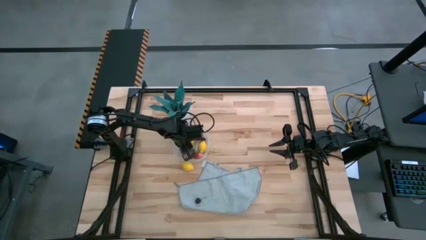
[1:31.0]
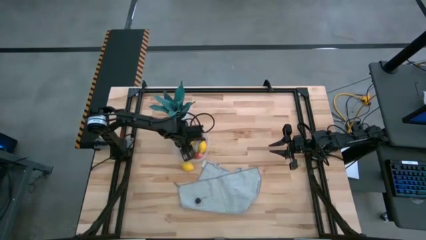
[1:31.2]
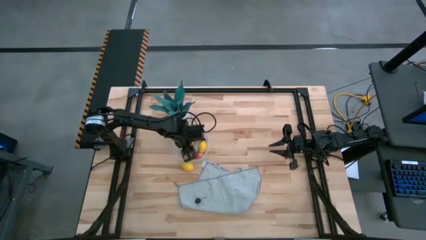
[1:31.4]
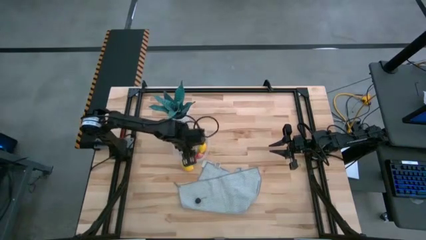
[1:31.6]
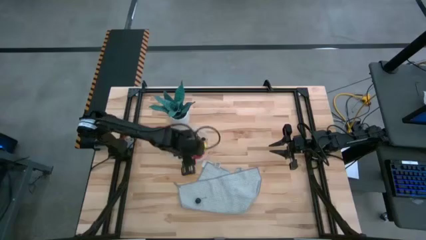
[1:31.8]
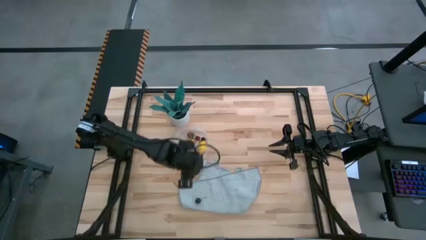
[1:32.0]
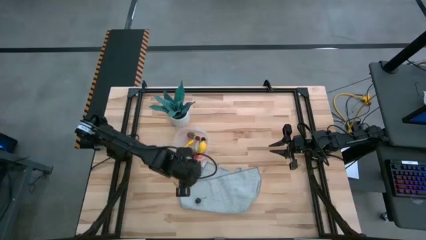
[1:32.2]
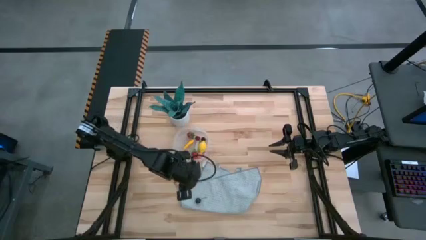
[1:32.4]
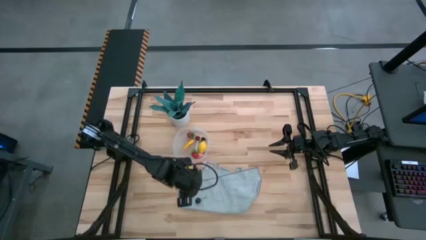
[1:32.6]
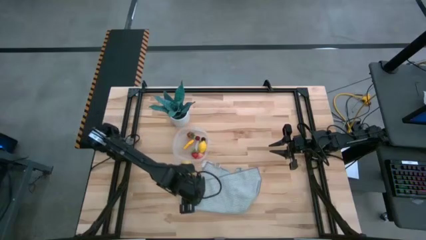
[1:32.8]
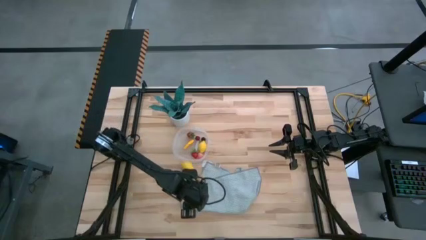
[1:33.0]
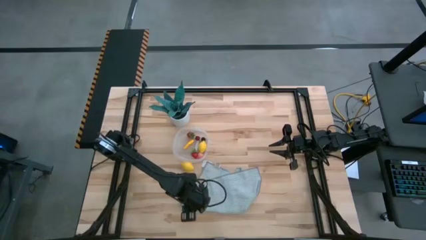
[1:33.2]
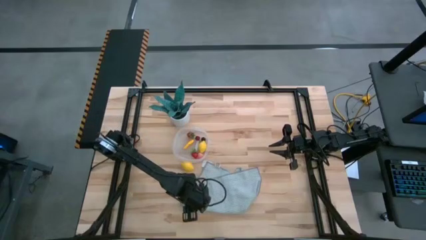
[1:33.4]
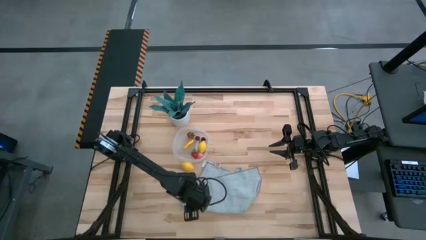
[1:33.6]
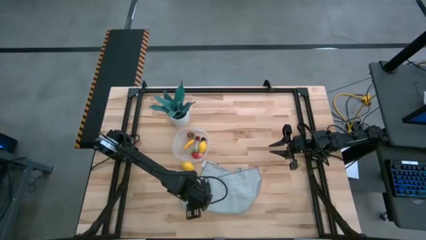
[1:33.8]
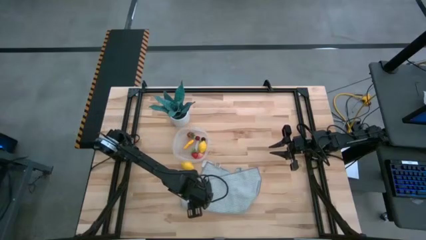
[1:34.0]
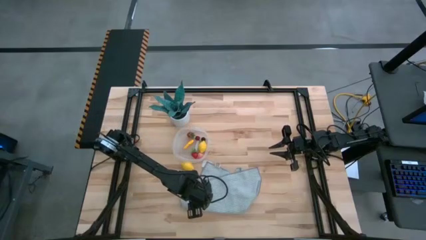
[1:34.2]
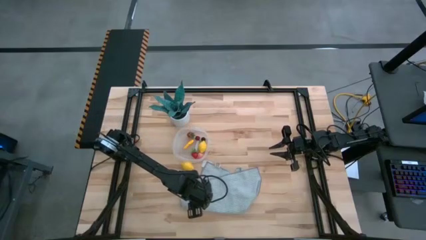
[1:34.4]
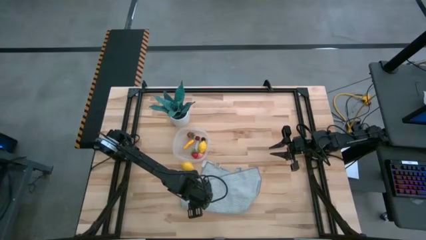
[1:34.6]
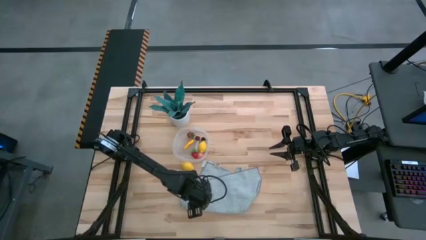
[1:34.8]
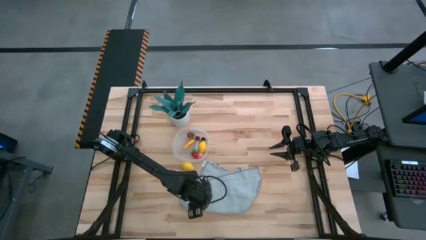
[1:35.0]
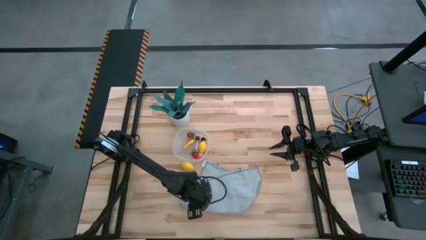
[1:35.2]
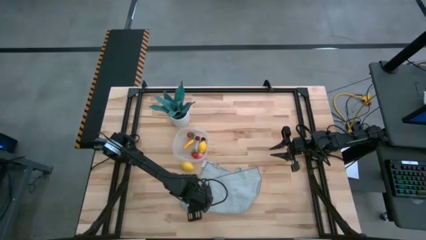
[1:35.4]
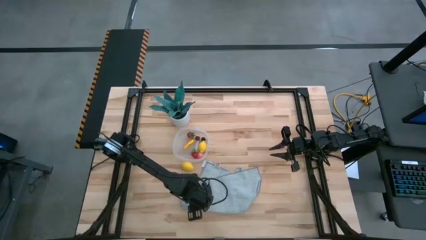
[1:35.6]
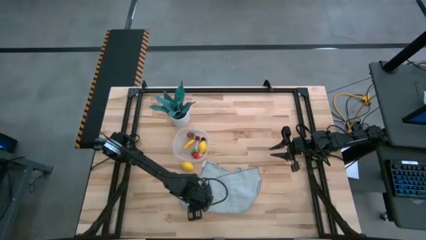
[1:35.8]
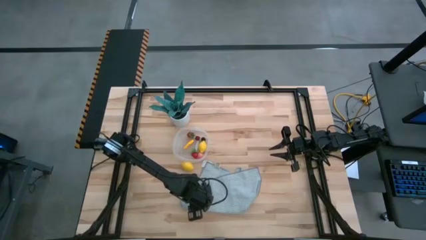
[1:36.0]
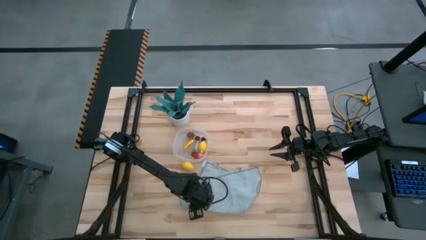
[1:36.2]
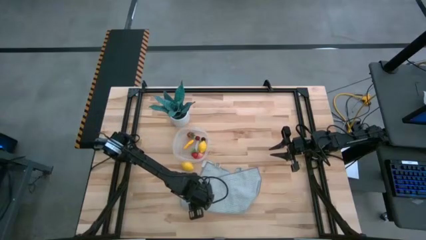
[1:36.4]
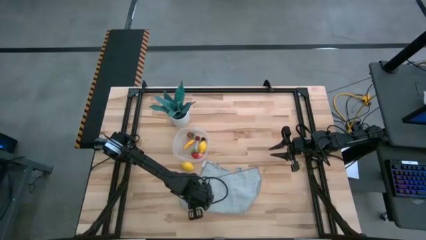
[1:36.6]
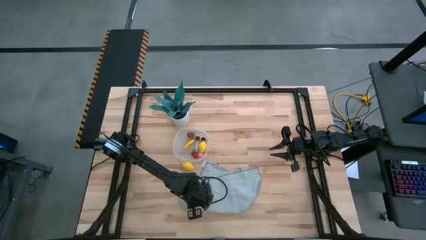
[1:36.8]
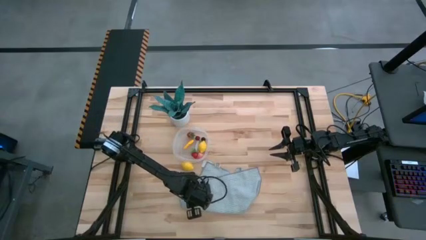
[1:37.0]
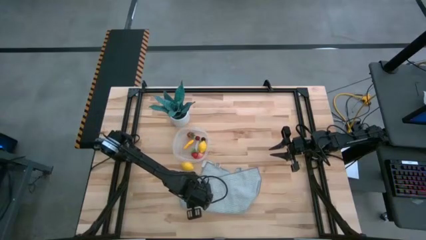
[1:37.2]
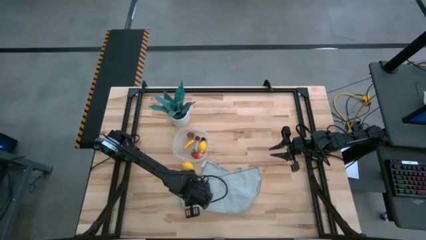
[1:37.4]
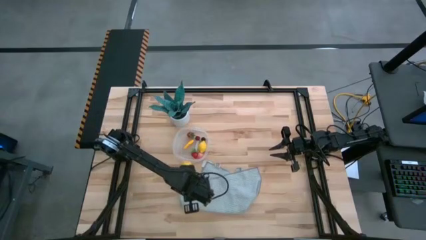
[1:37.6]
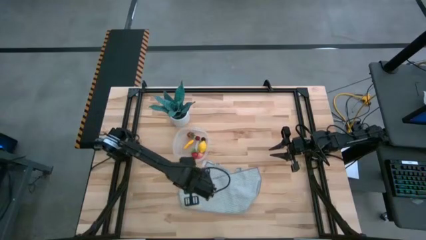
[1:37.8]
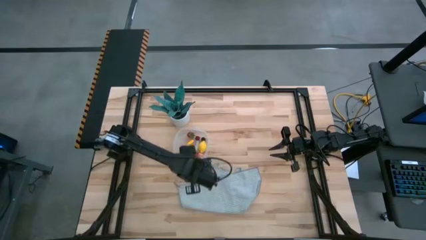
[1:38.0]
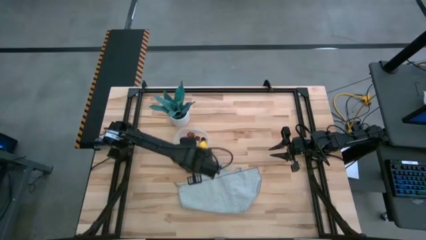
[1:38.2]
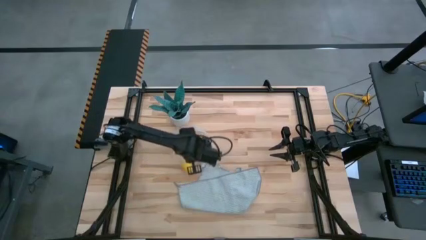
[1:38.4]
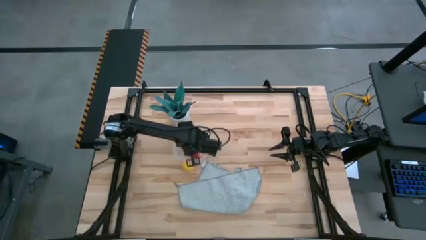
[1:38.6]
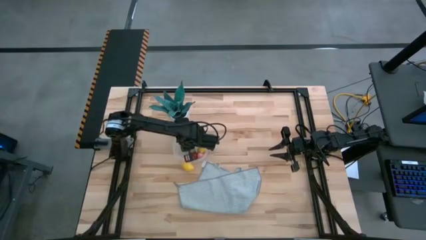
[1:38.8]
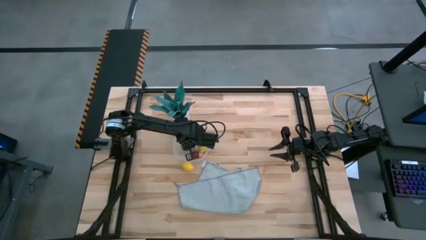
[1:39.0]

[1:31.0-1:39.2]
Task: Pick and placing Produce into tupperware
Put the black cherry into the container

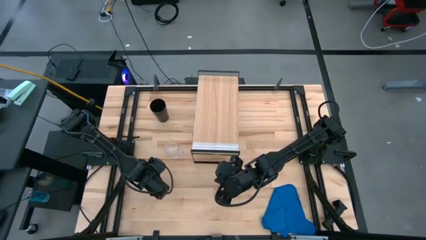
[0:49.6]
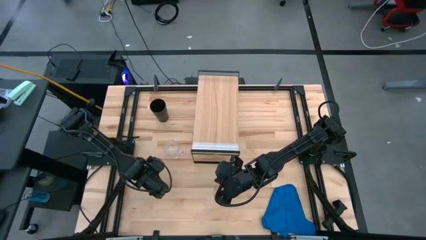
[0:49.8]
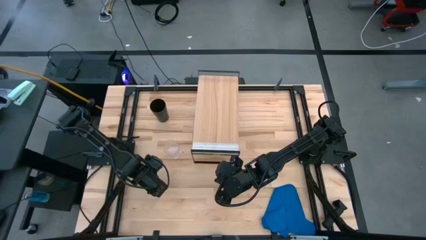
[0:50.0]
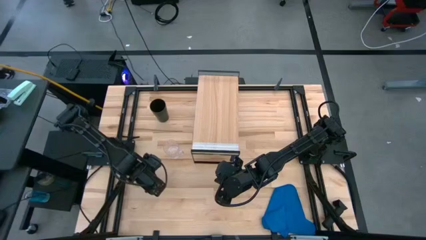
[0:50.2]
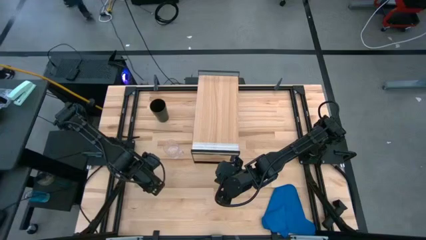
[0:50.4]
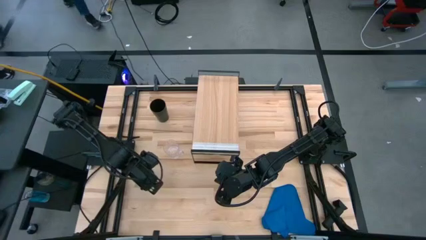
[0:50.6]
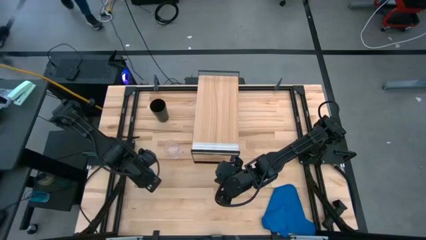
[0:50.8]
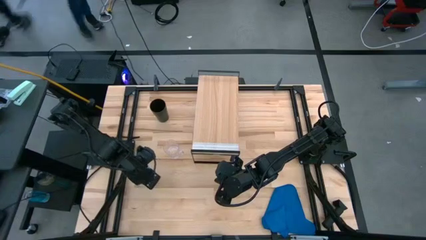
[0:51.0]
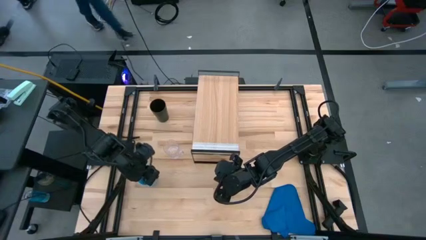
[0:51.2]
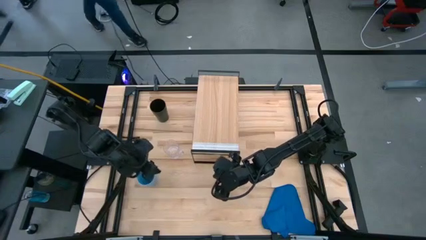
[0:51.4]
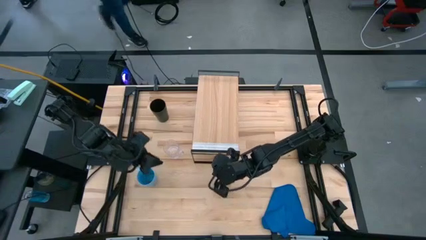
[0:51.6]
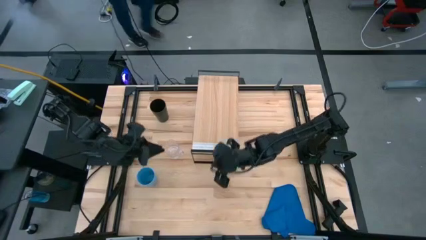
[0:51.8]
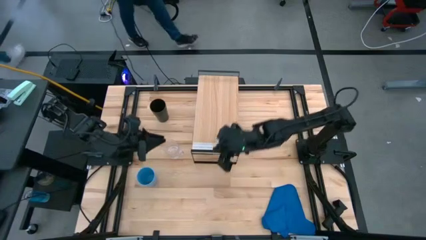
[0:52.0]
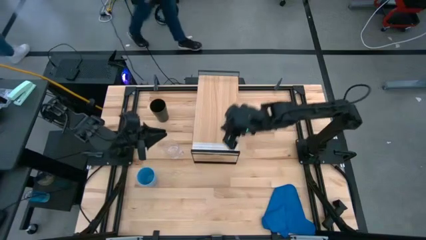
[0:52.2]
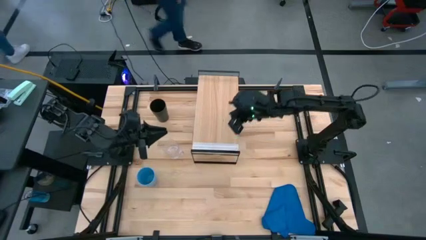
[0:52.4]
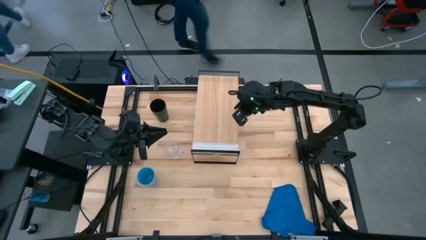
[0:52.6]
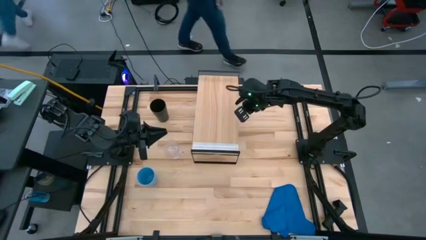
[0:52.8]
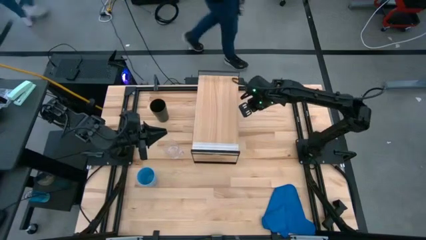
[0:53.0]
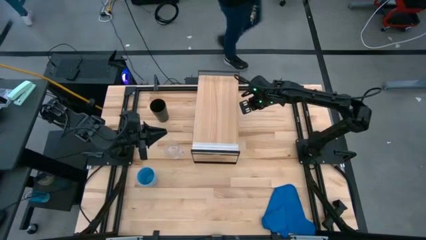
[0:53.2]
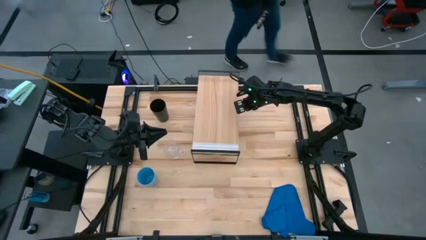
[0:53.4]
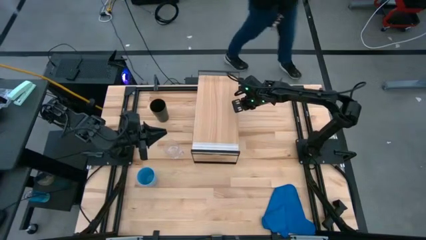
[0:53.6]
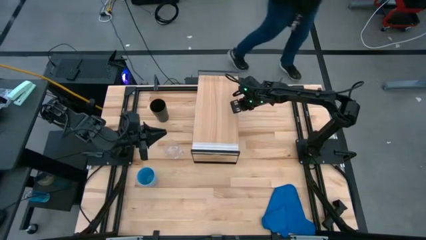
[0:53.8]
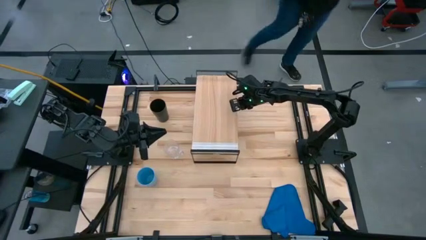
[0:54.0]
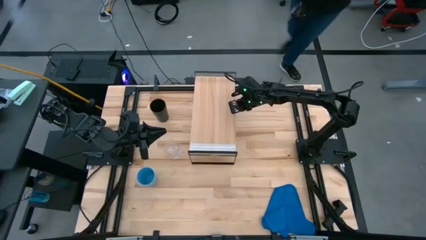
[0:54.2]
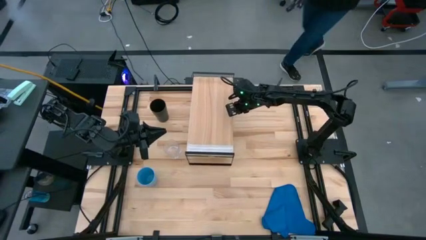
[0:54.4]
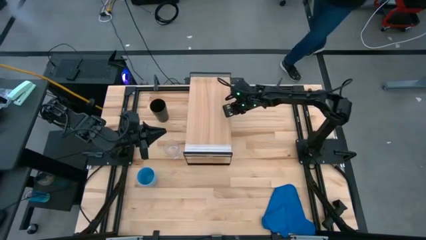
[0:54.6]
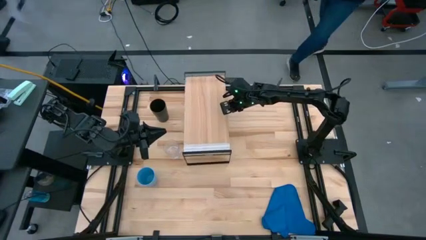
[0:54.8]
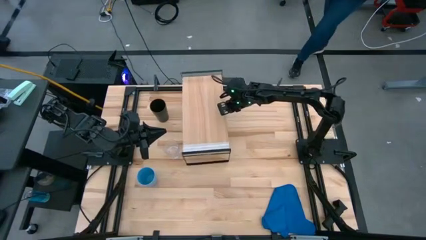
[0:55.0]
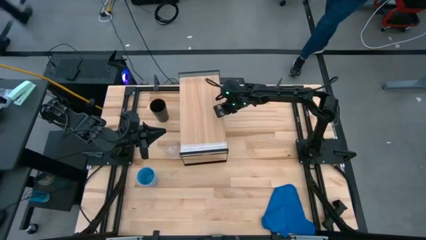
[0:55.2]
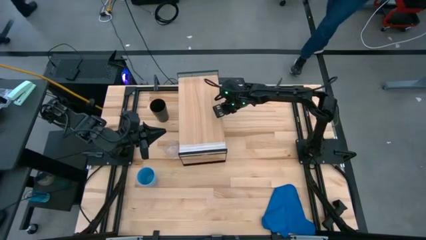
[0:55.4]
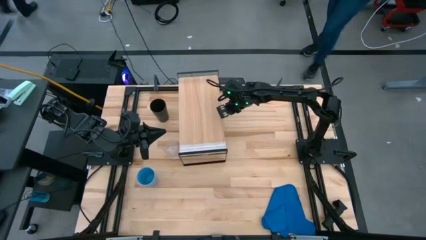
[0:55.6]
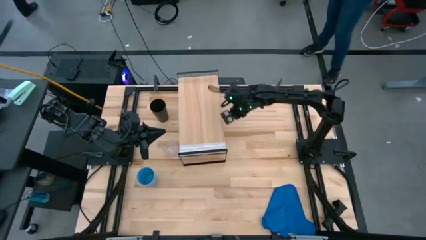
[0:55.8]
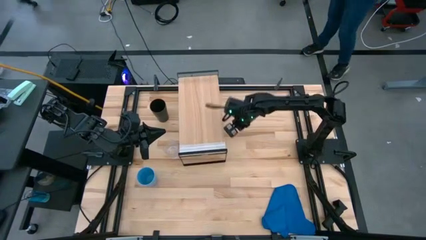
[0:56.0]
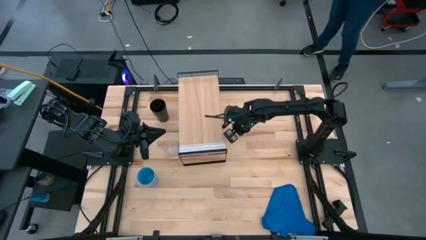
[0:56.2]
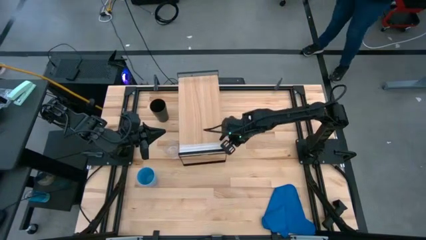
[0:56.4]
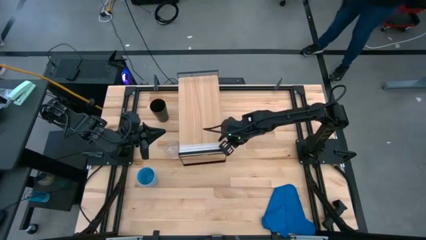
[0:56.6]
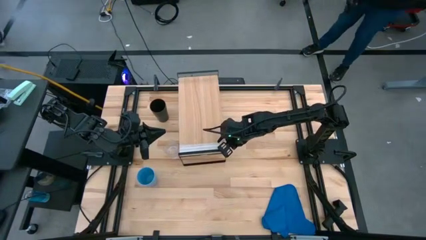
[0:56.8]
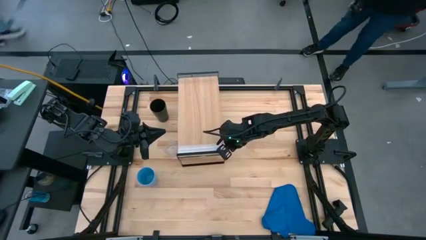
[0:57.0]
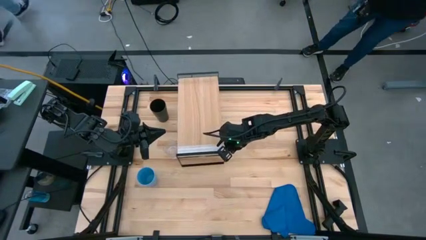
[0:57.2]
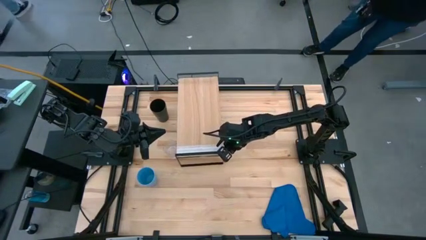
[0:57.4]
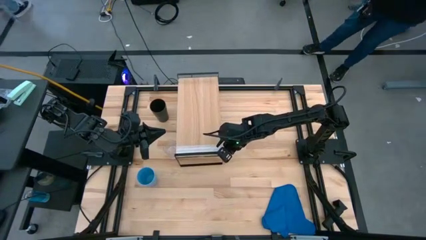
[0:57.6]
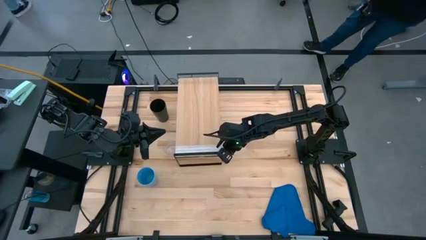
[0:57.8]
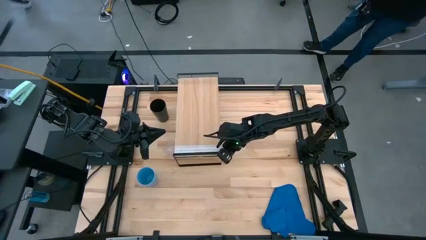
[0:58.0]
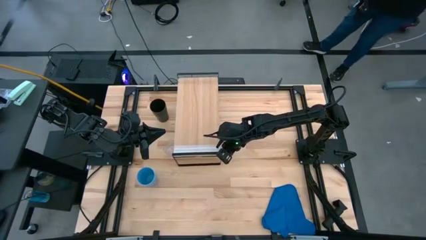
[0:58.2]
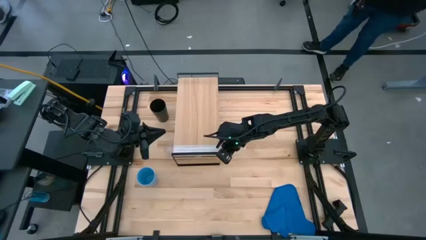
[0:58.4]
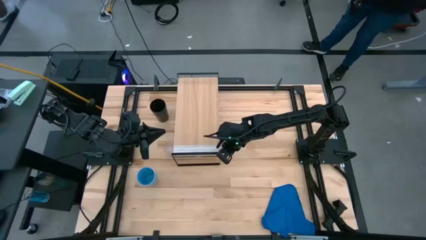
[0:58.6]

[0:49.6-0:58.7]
Task: Stack small to large cups/mugs on shelf
Adjust the shelf
